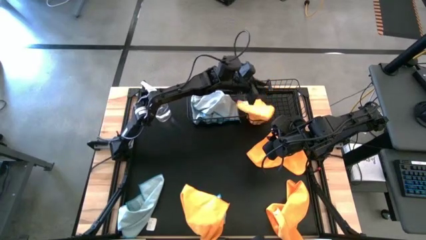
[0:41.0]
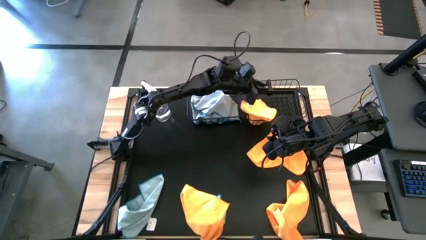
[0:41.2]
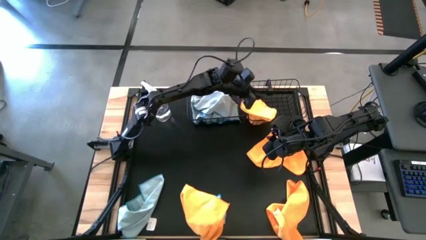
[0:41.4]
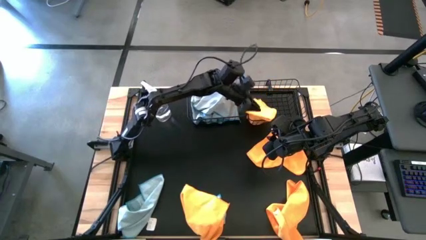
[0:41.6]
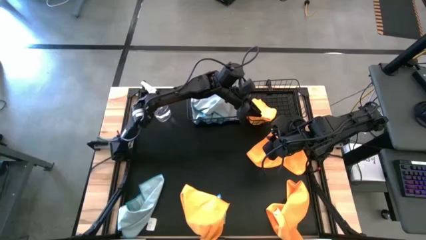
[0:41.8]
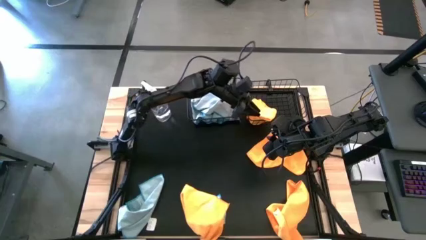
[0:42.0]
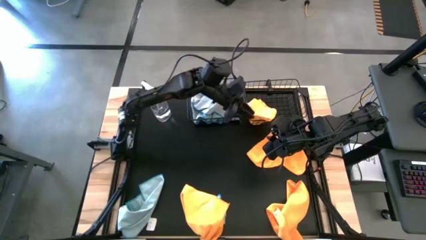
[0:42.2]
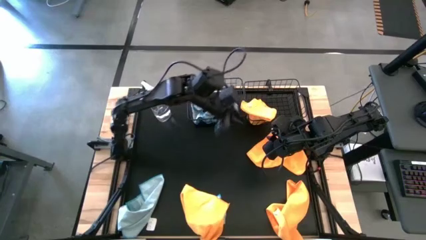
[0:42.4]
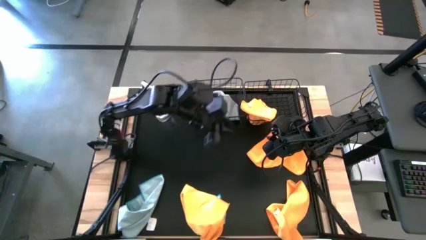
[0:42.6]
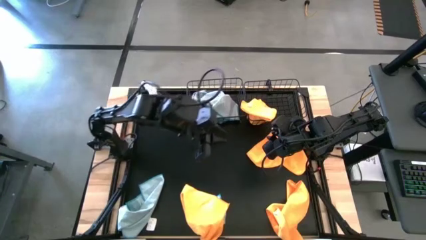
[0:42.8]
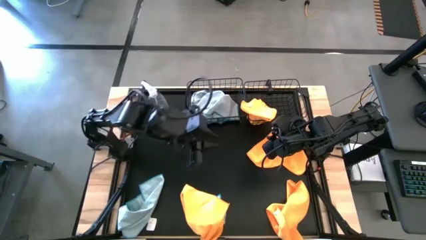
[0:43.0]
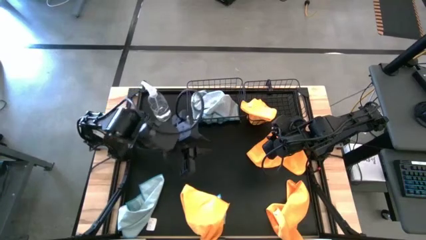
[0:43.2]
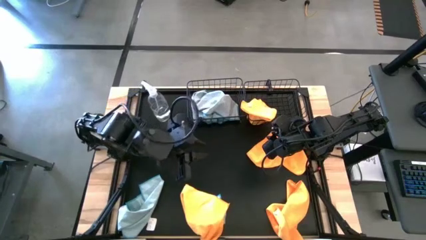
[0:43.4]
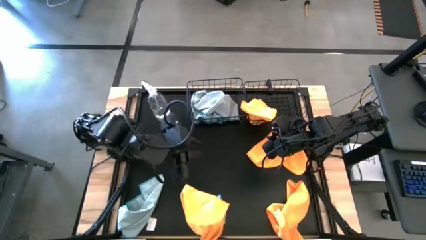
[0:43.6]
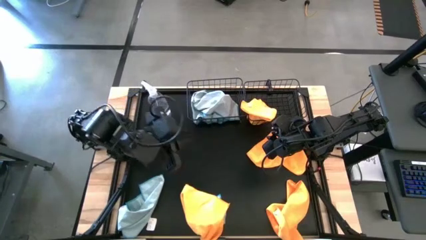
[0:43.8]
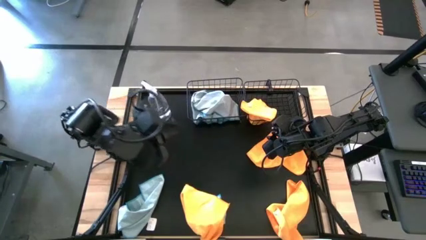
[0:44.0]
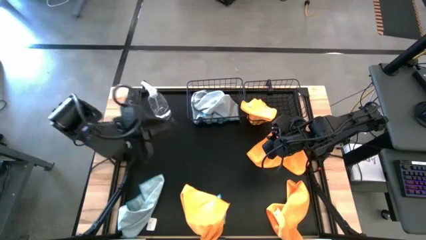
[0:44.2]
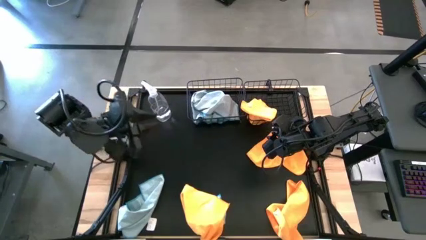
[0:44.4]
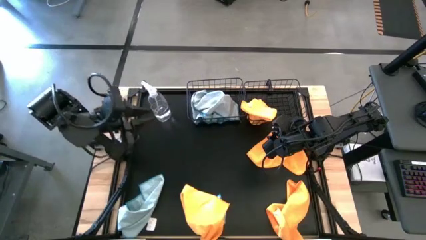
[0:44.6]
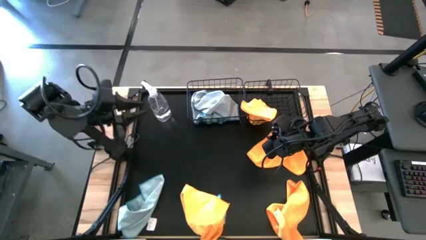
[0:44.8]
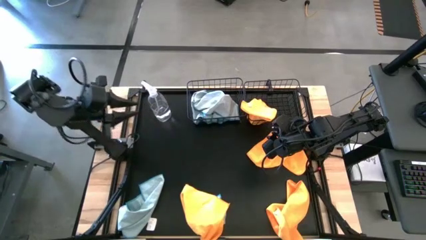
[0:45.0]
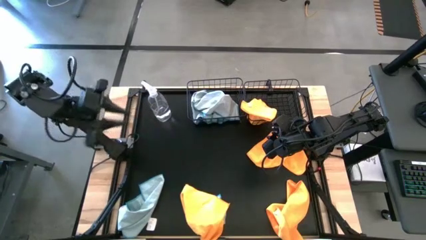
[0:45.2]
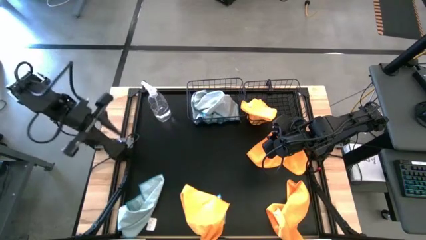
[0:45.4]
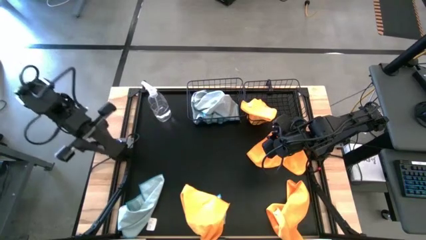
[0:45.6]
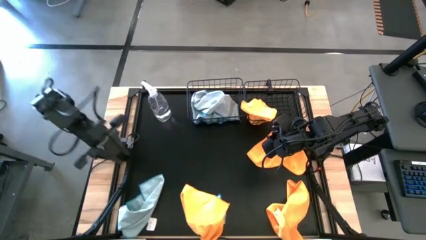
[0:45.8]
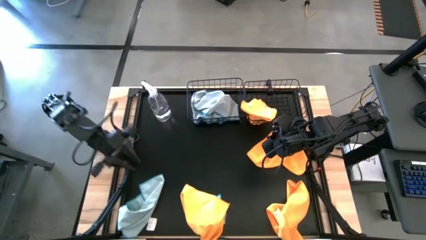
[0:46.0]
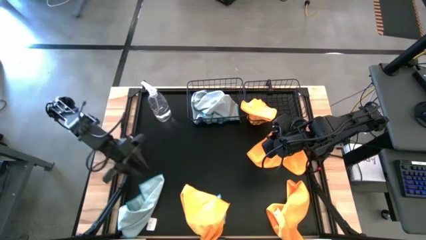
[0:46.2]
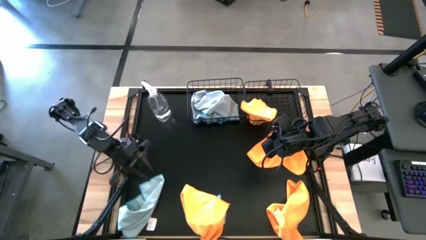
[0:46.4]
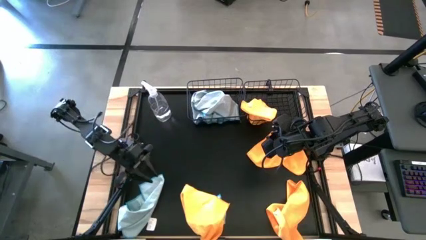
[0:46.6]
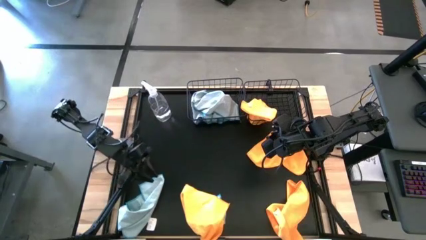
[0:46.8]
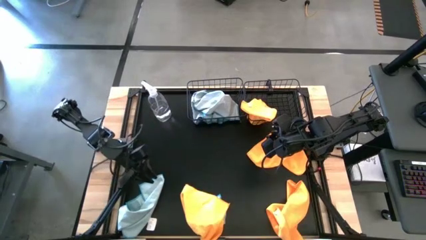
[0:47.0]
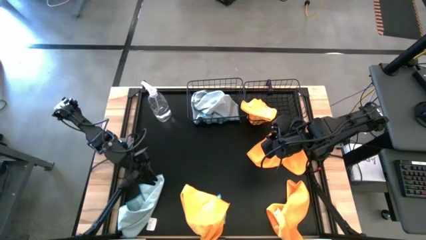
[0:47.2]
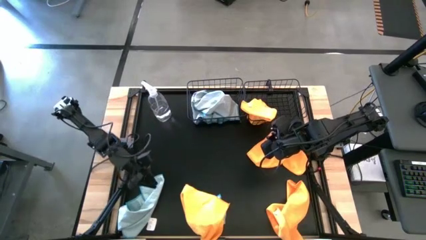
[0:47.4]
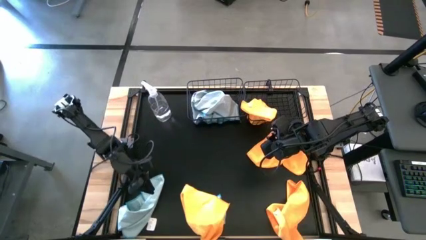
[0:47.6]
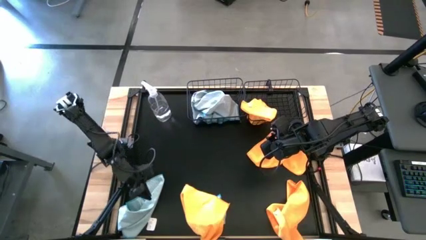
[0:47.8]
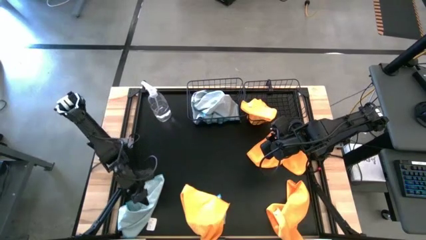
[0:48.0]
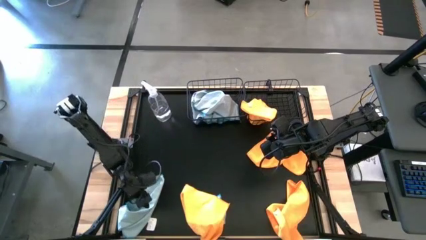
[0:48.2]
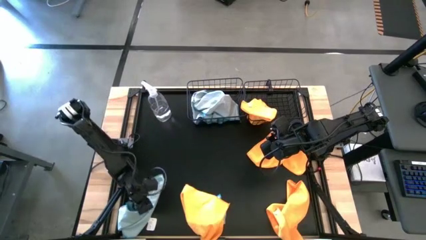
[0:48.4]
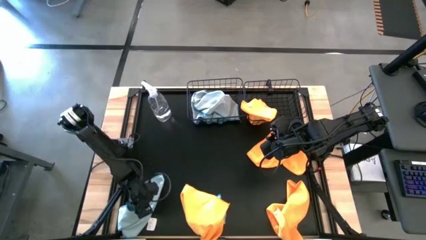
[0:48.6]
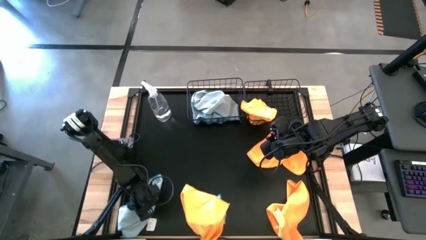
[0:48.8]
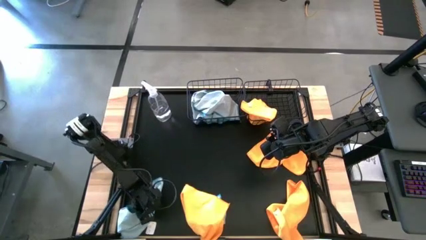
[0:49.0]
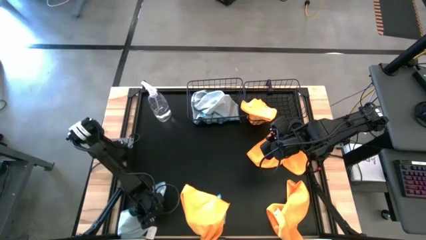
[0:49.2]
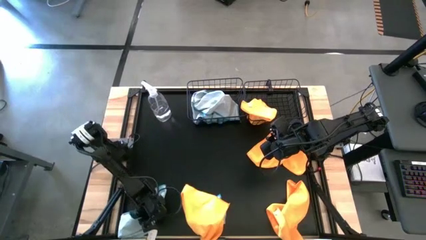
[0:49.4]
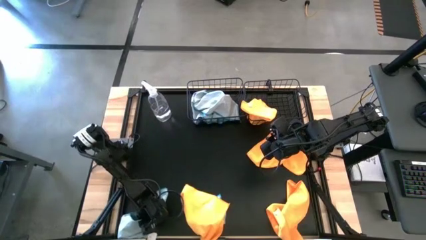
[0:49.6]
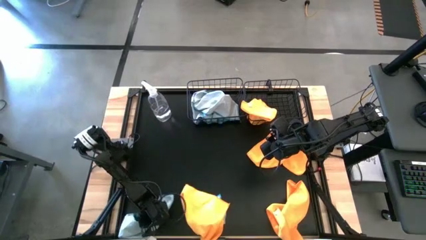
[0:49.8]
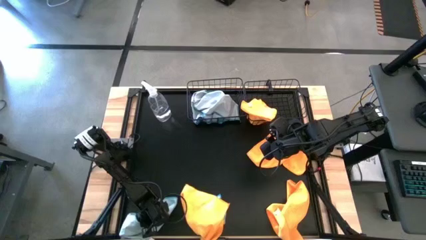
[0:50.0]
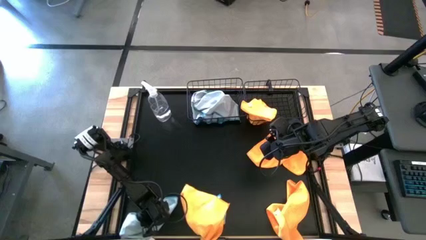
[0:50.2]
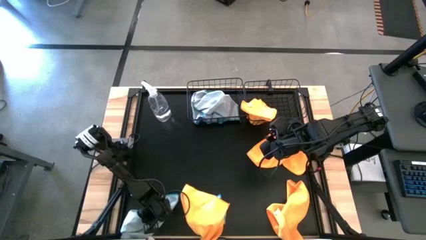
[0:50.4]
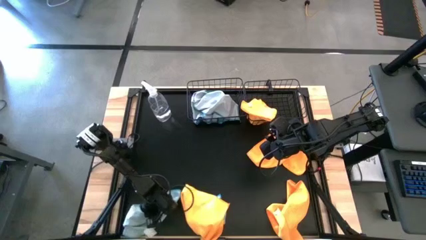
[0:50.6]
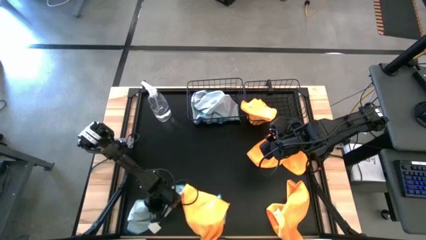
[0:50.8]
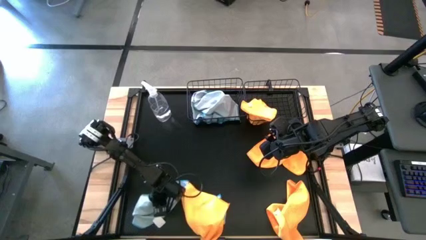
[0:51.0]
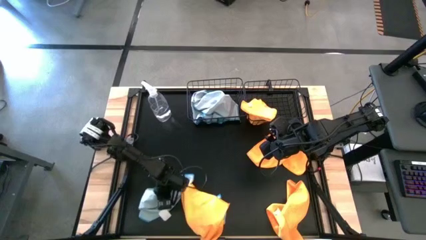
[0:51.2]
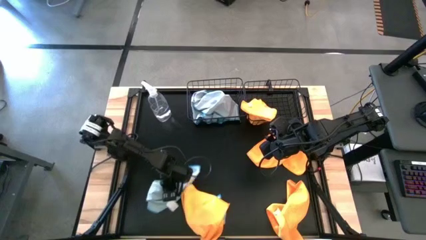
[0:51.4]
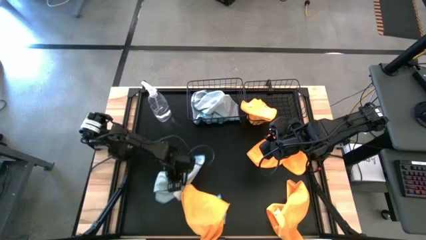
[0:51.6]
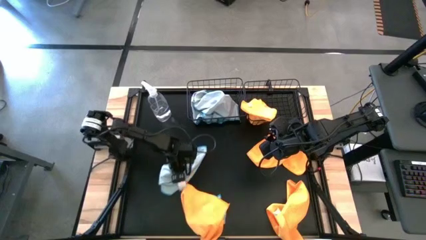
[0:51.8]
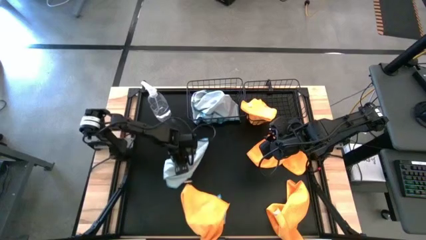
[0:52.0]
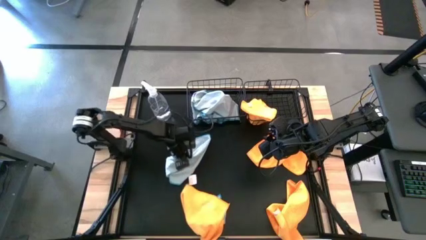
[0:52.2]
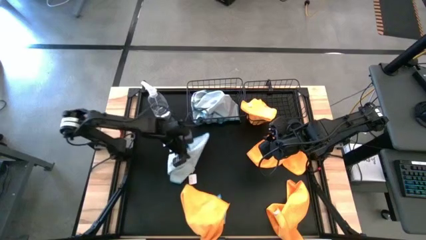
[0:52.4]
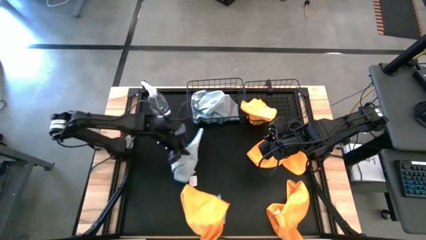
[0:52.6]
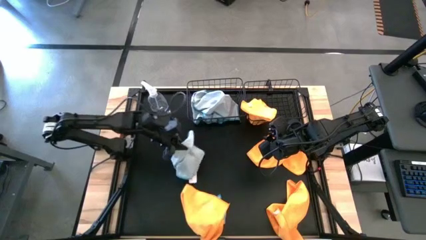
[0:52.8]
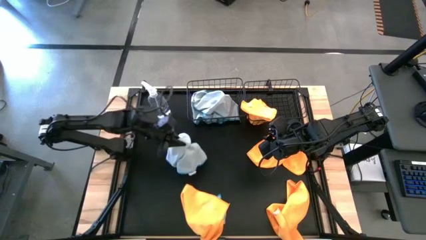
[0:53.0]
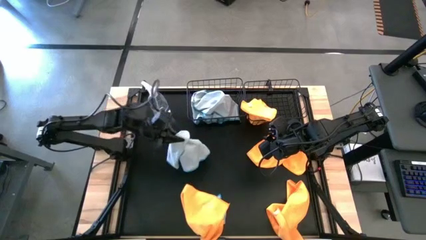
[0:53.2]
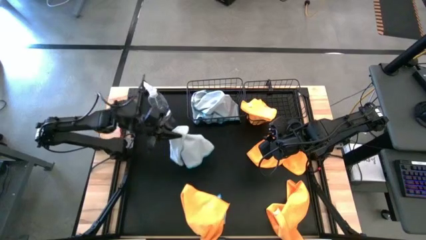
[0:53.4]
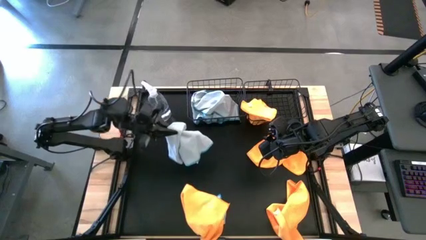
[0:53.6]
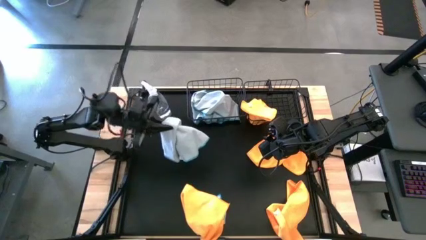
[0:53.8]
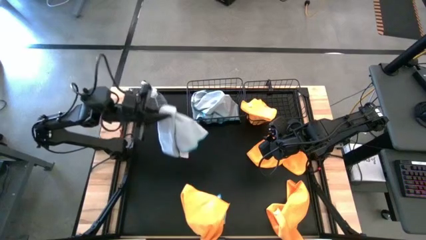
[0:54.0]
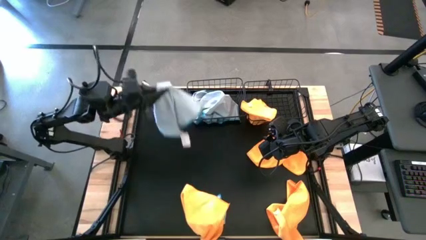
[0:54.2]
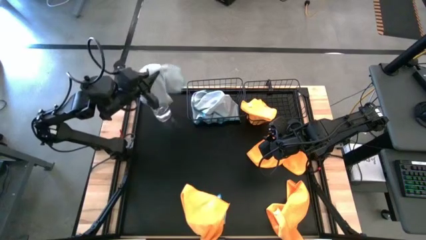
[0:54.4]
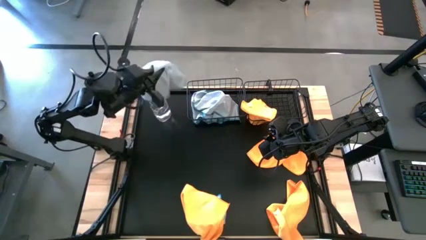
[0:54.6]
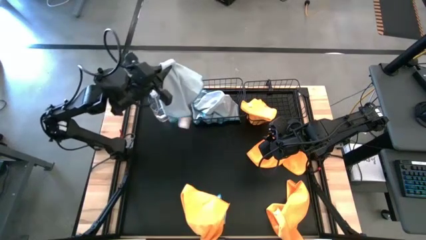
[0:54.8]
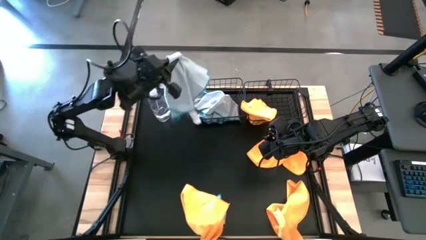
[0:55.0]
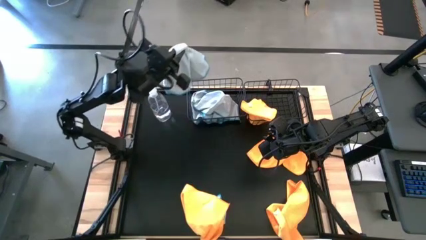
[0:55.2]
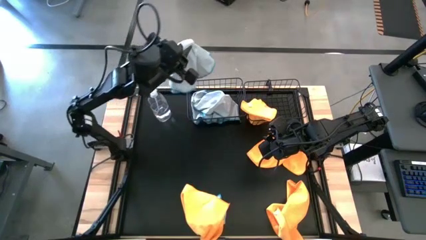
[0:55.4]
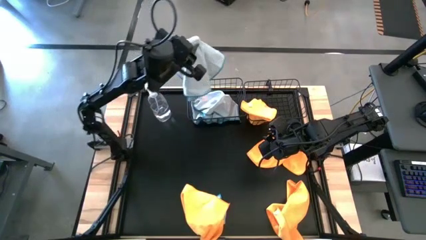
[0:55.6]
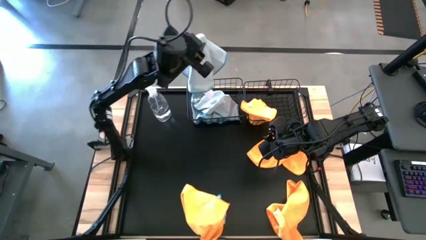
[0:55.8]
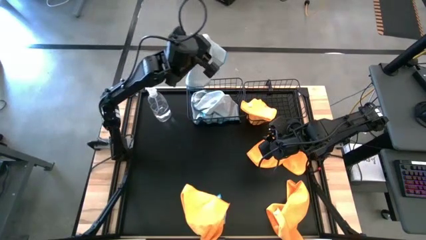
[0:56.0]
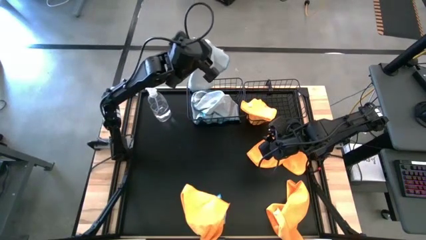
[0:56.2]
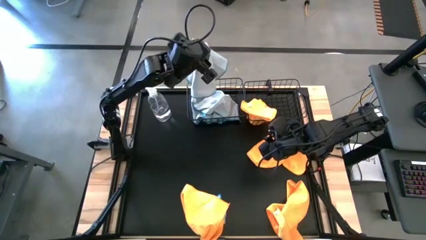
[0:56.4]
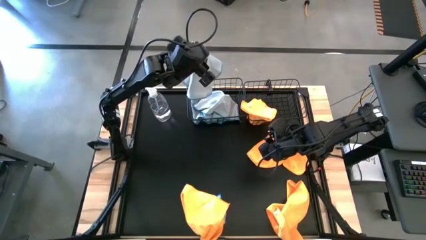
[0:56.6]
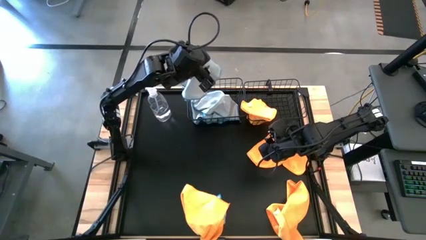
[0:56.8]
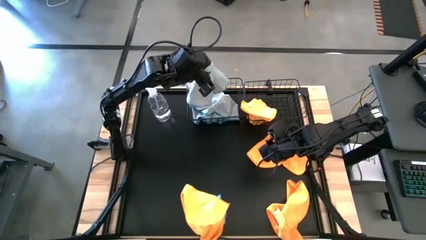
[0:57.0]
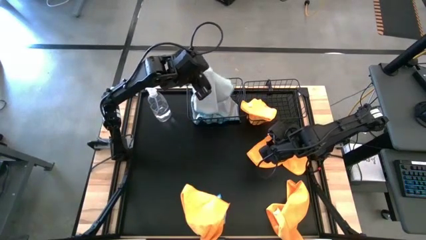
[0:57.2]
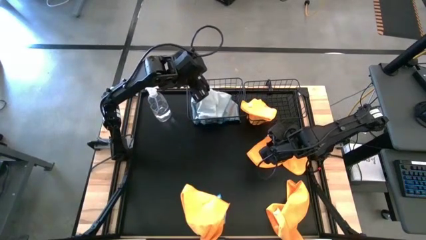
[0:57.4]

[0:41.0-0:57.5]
Task: Sort microfiber towel by color & place in baskets
Put the blue microfiber towel into the left black wire basket
